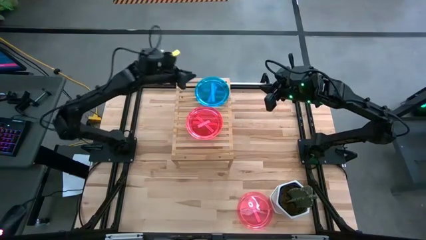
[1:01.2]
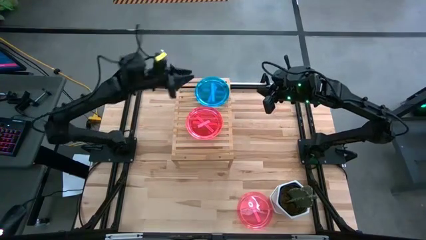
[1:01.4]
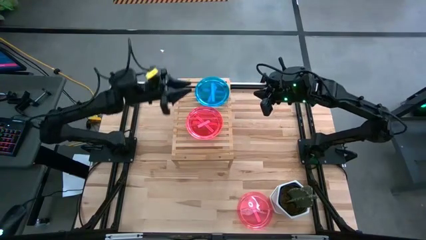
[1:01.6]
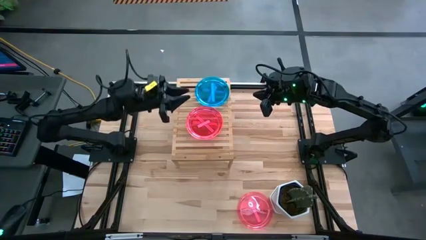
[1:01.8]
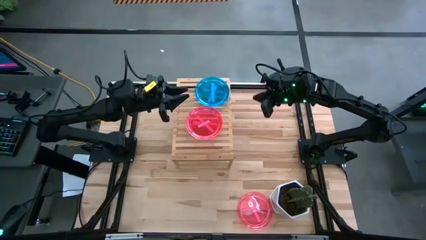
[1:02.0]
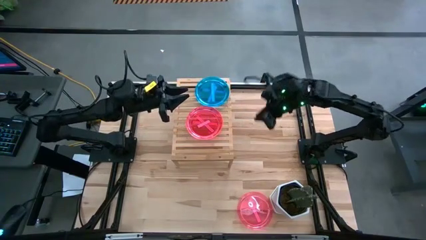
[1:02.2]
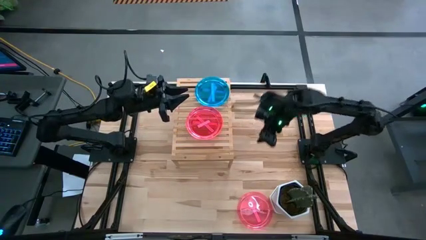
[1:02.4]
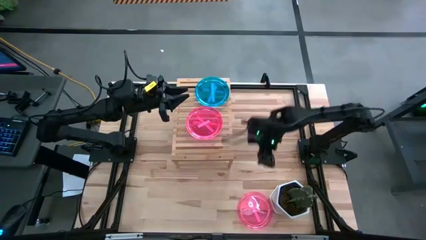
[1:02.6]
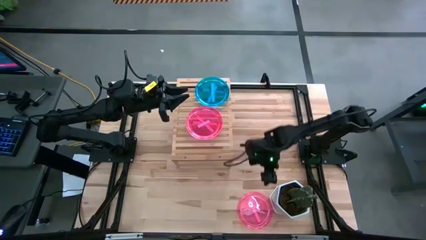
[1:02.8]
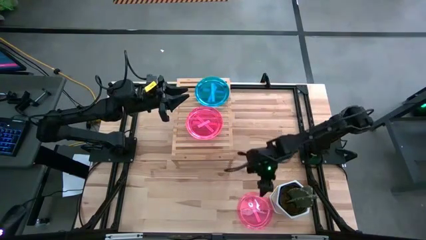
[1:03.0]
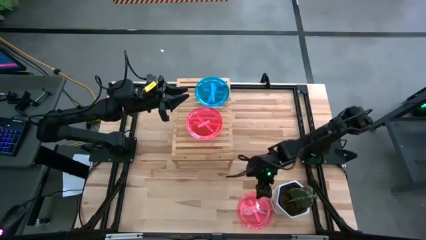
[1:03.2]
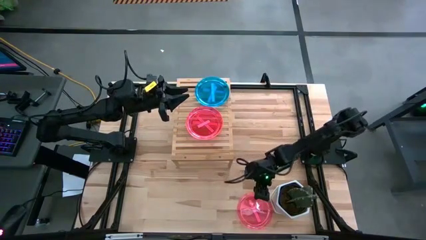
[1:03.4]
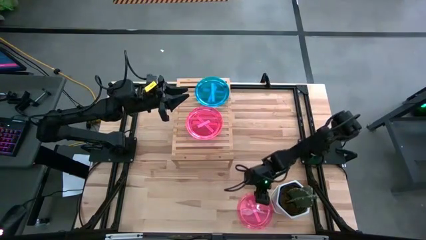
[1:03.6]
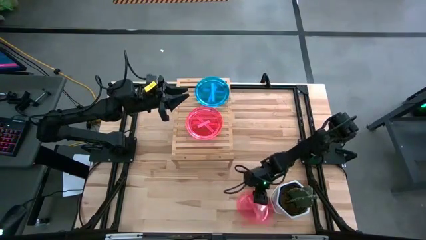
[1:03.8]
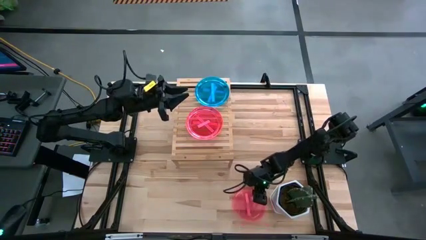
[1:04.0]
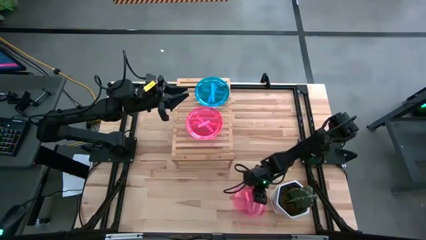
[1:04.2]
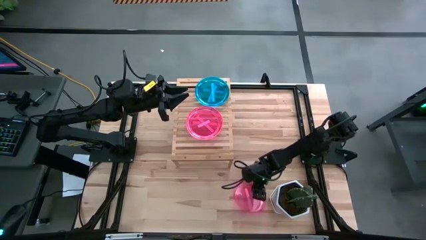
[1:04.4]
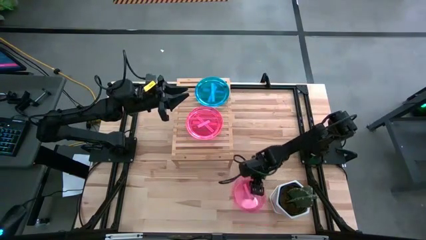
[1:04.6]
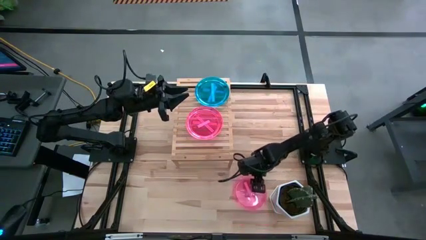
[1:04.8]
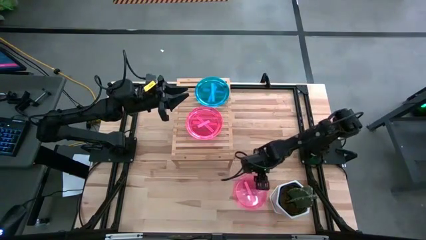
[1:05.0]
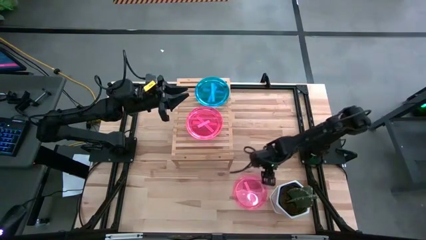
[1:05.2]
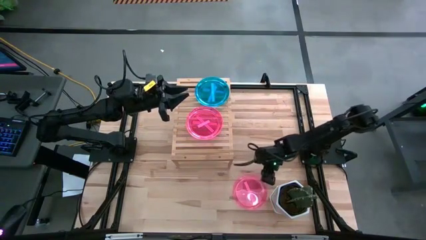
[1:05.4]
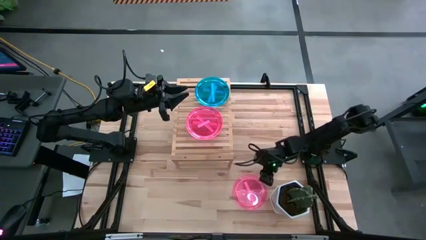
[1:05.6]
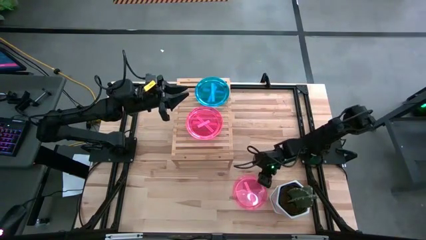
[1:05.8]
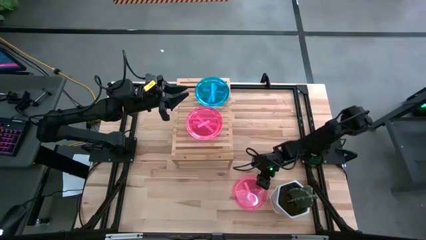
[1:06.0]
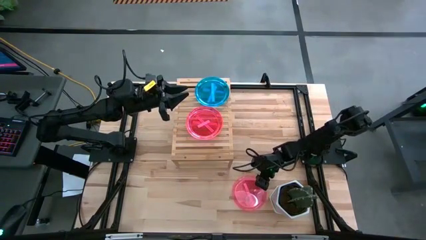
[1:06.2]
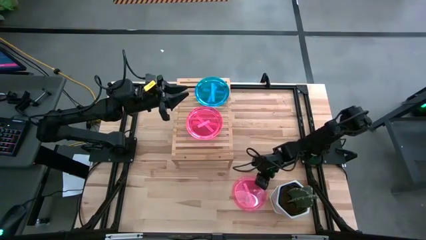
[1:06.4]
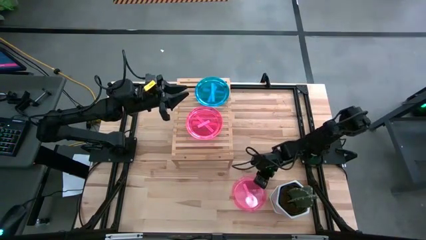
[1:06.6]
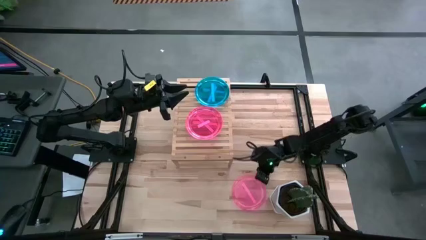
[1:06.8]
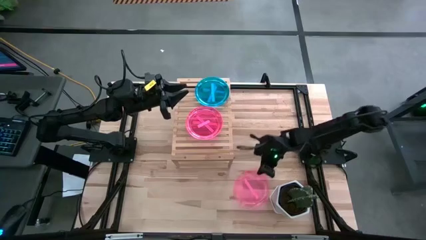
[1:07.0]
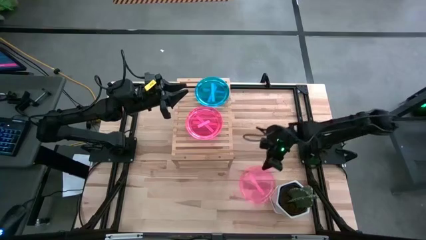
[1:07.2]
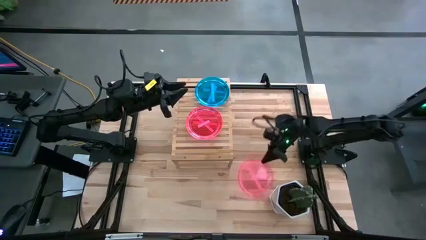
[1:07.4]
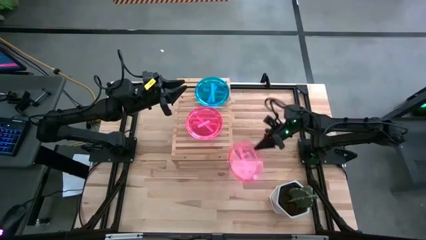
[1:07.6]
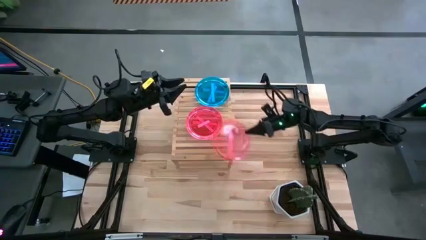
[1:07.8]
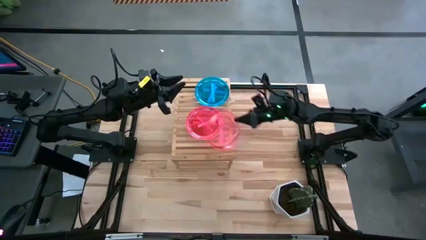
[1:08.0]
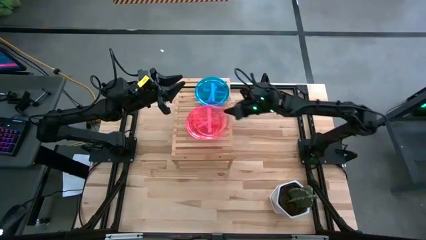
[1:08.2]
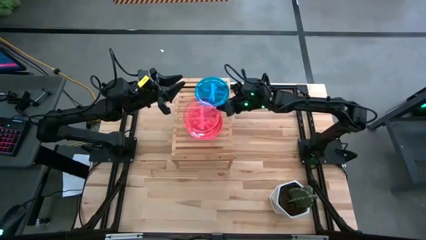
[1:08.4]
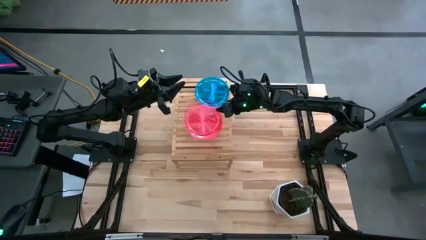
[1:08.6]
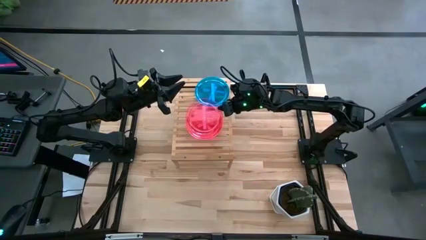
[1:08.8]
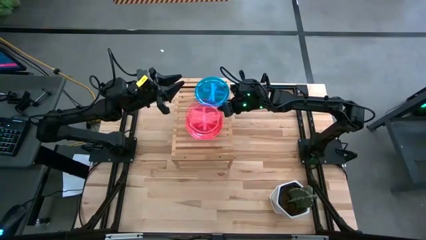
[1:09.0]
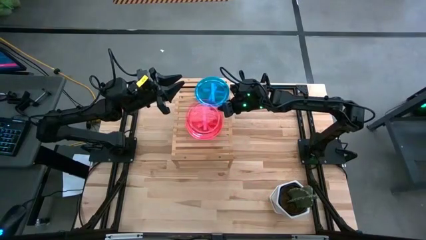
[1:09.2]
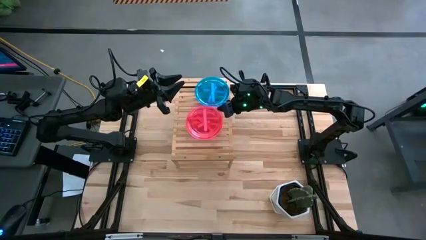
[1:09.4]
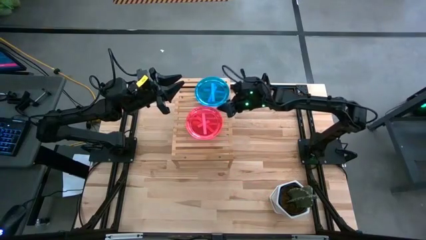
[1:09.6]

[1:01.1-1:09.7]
Task: Place and stack plates onto a shelf
Stack the pink plate on top of the pink plate on the shelf

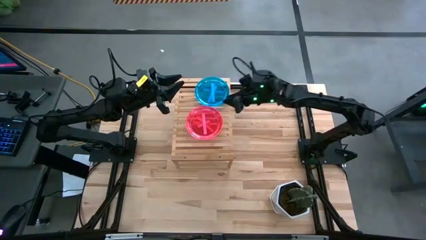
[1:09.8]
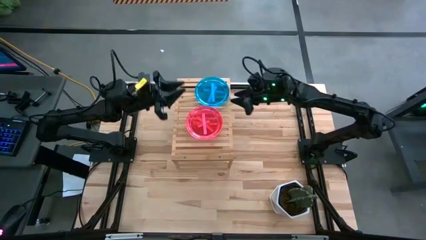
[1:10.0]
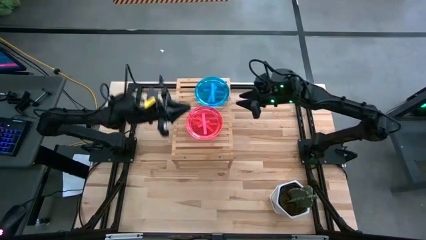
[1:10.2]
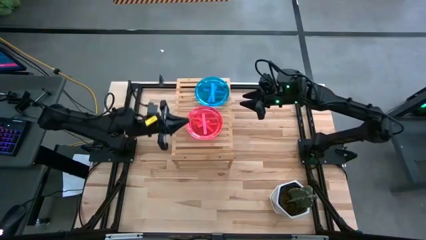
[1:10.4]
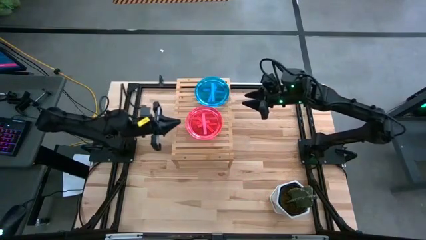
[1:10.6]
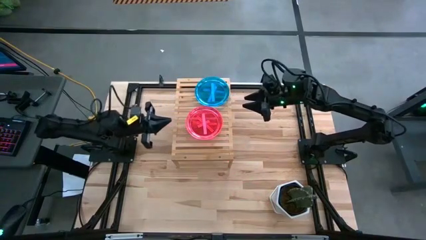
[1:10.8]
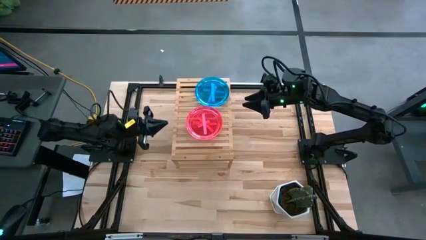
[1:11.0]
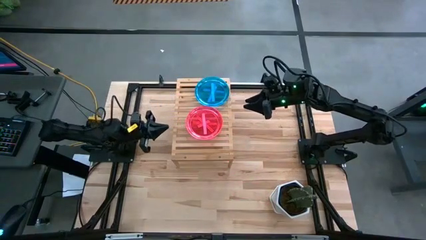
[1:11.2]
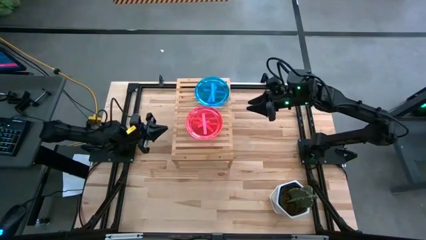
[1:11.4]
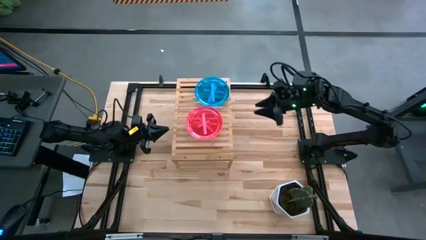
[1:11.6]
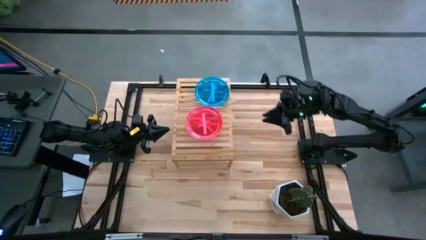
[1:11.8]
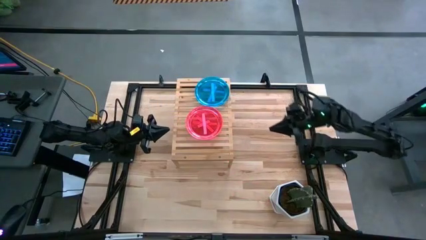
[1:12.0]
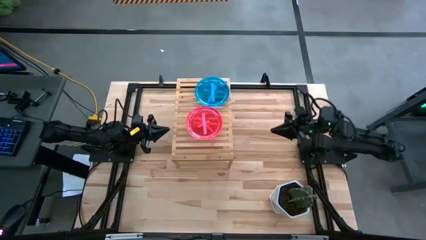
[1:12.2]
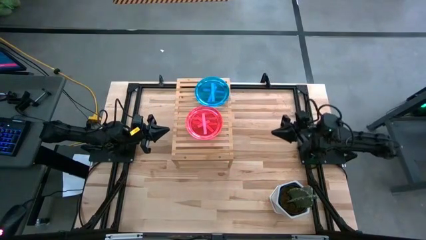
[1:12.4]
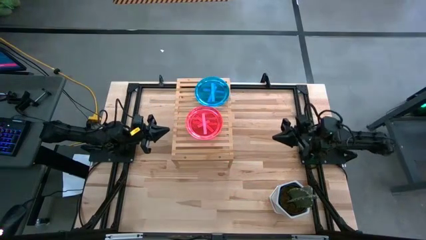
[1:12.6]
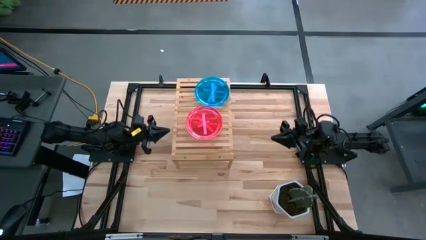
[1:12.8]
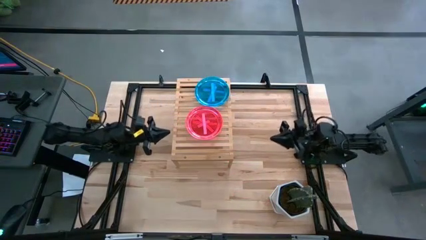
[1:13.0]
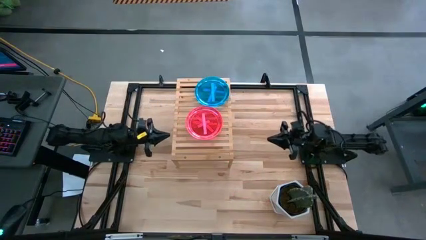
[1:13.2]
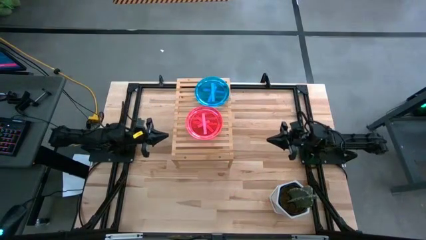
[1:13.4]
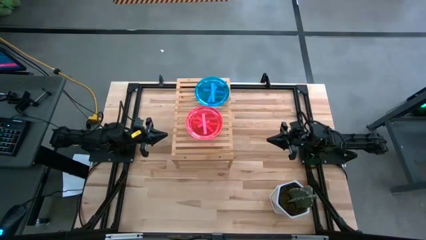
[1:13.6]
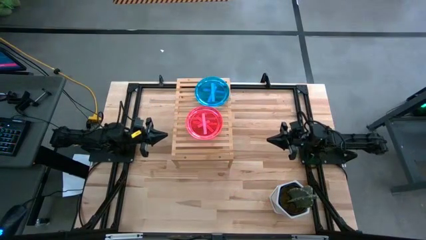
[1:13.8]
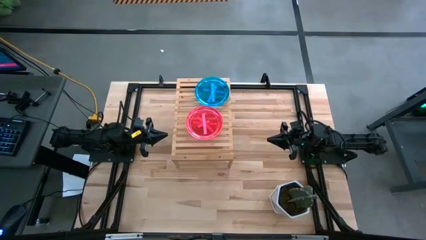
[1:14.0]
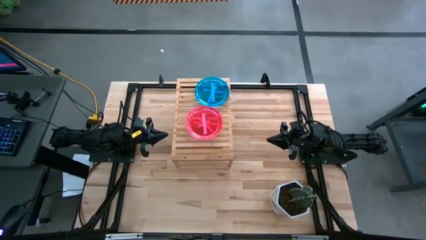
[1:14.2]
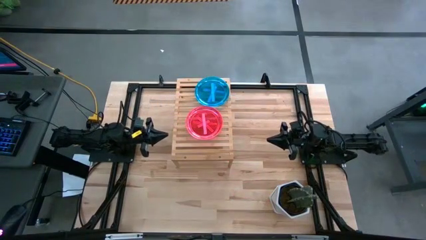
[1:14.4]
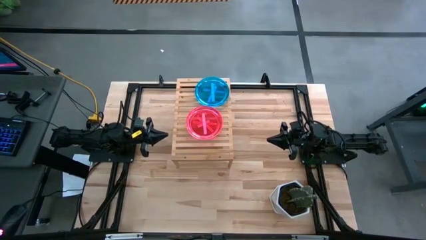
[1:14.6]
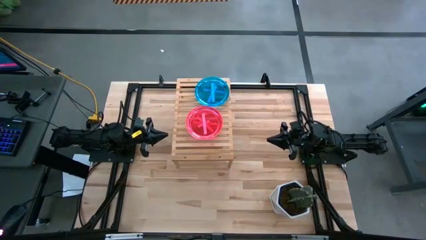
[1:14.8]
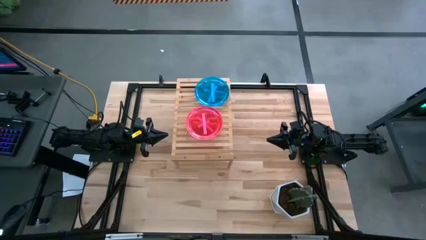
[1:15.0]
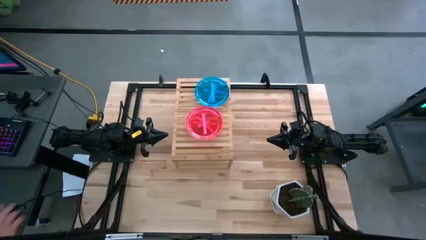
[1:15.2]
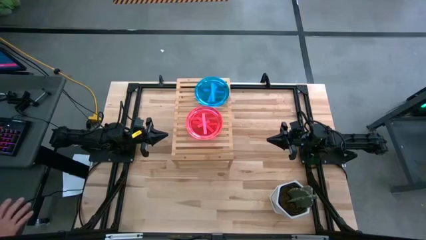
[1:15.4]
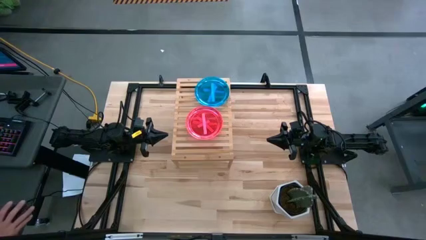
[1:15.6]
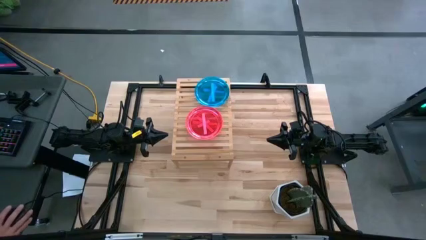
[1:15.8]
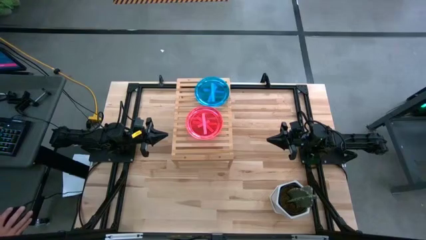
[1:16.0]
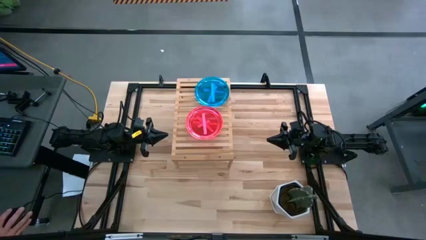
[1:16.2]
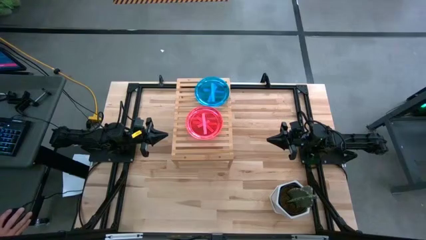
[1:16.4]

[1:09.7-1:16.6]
Return to Home Position

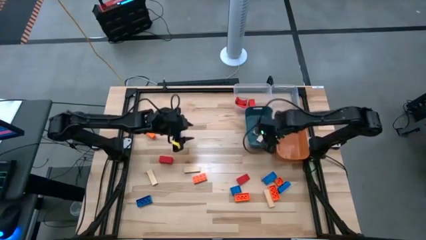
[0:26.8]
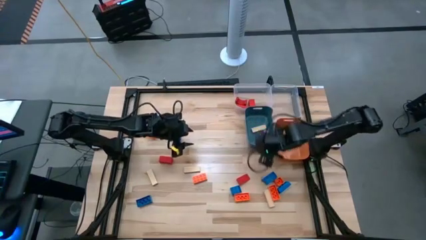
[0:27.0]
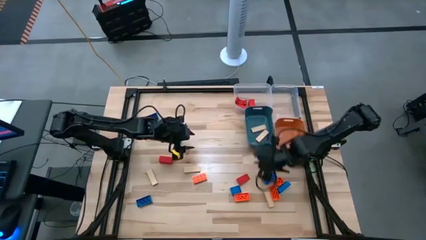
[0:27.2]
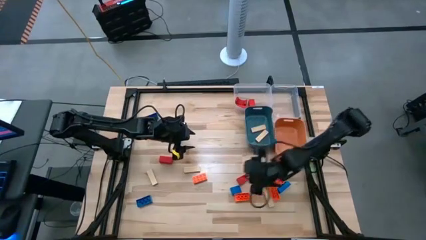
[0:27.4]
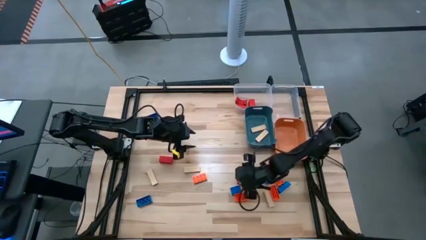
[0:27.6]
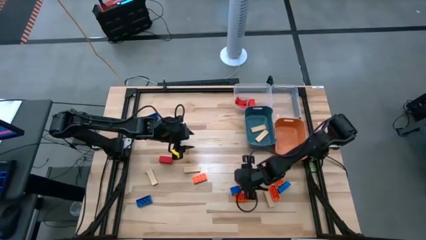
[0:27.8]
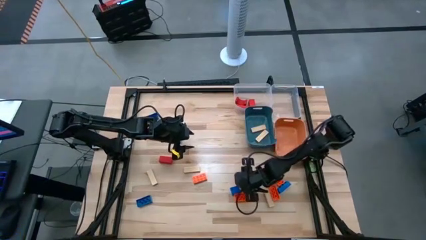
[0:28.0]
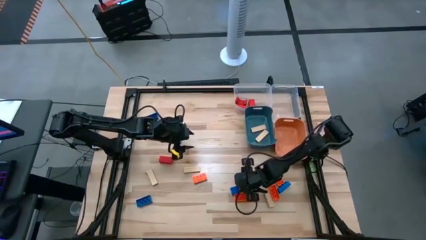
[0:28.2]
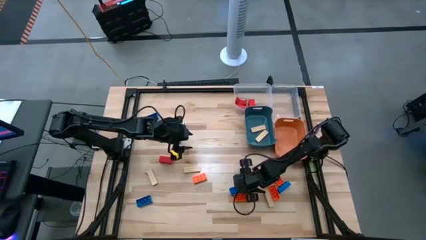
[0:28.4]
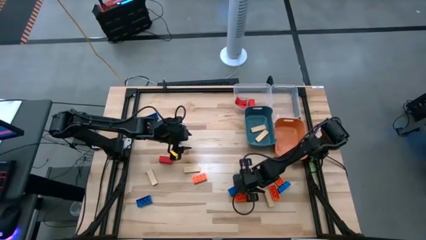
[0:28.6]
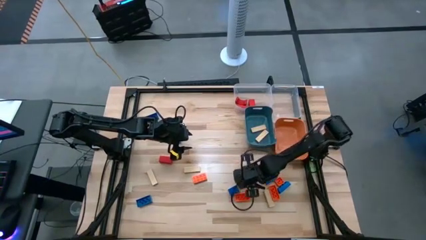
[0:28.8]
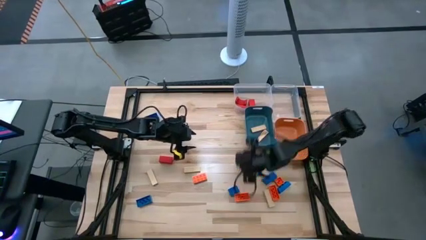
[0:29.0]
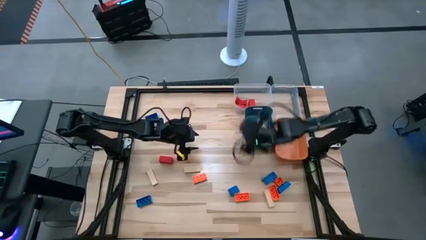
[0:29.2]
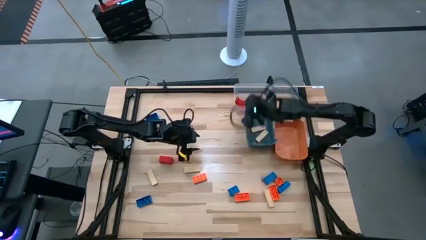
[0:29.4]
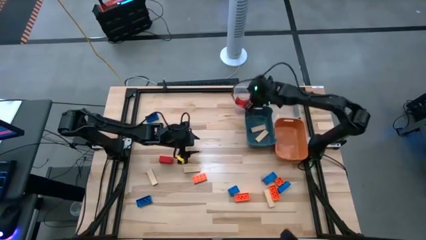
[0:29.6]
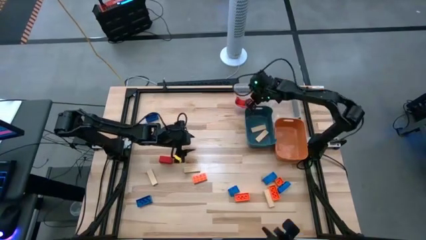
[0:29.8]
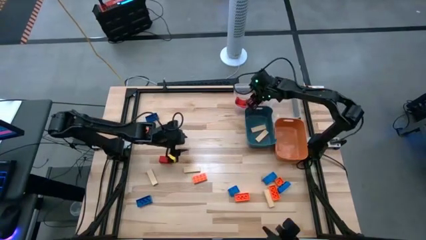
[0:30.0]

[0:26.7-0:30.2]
Task: Sort blocks
Put the red block into the left transparent bin
